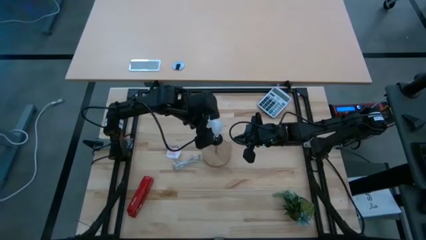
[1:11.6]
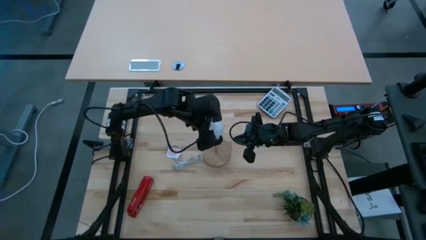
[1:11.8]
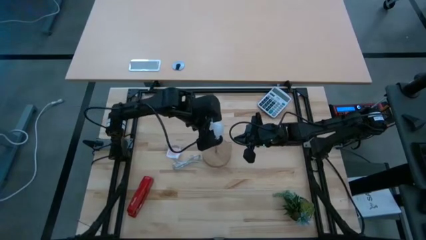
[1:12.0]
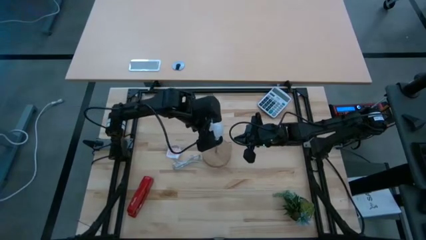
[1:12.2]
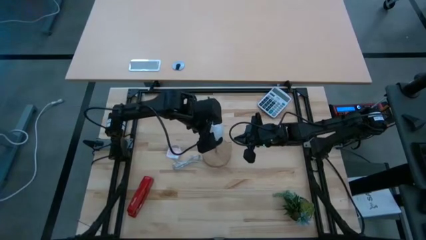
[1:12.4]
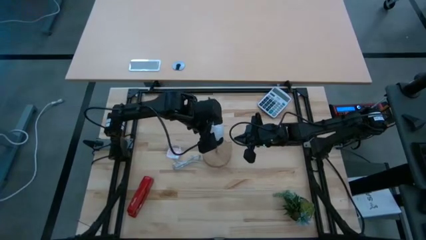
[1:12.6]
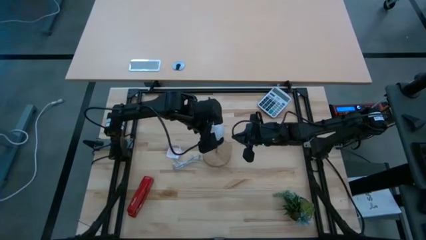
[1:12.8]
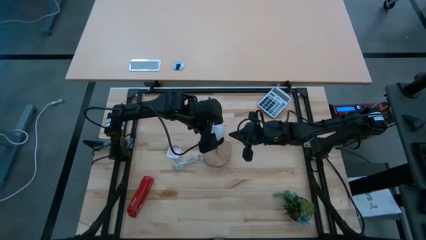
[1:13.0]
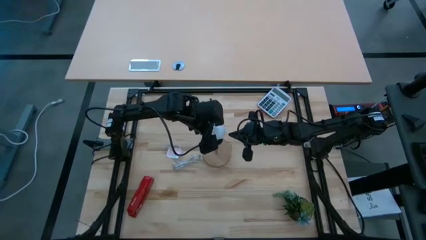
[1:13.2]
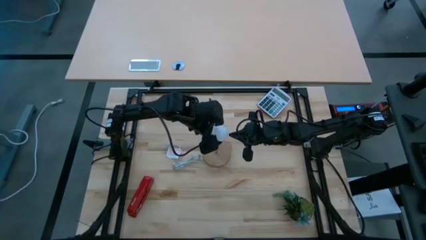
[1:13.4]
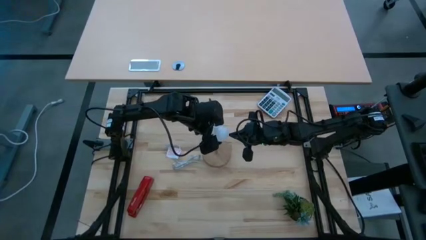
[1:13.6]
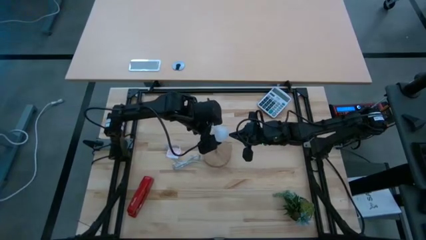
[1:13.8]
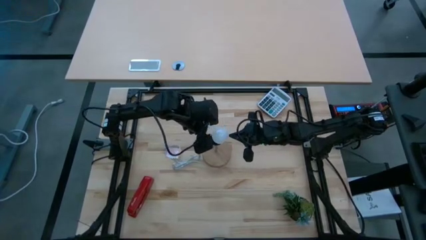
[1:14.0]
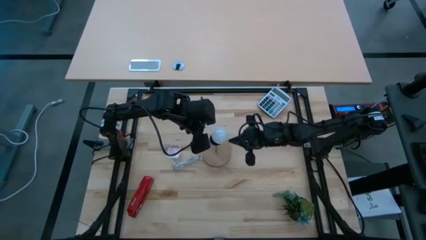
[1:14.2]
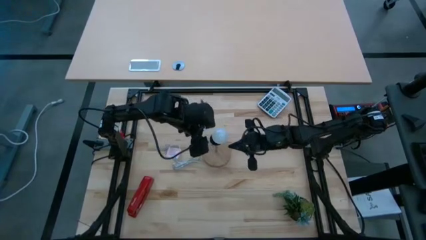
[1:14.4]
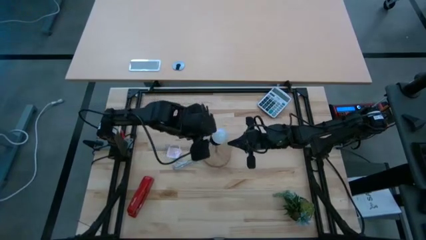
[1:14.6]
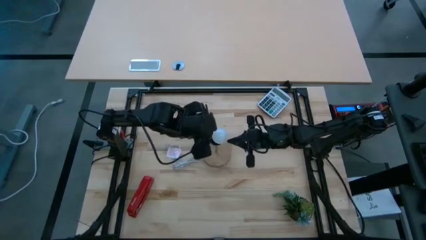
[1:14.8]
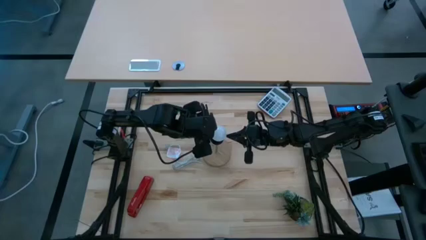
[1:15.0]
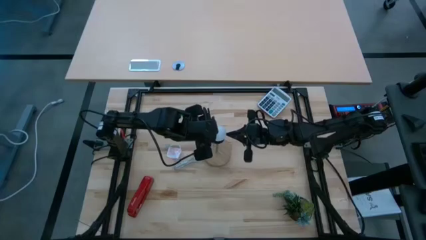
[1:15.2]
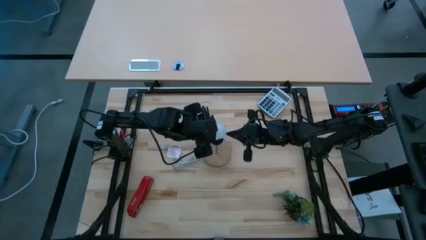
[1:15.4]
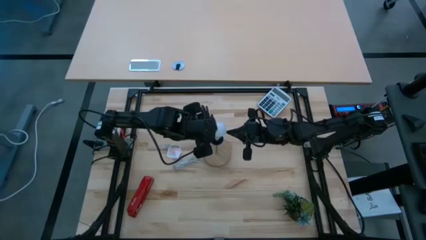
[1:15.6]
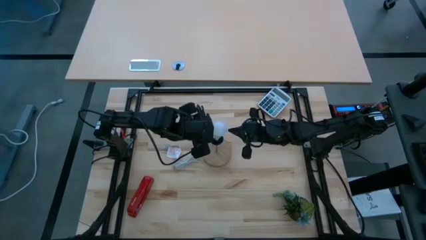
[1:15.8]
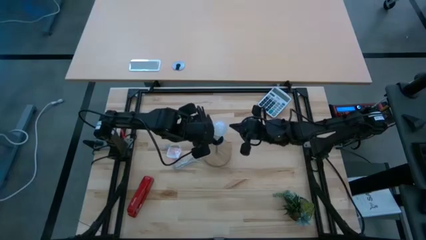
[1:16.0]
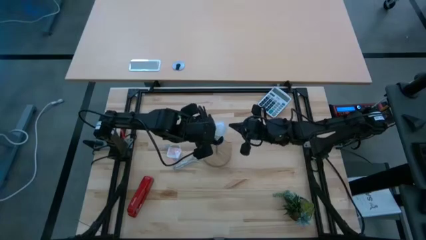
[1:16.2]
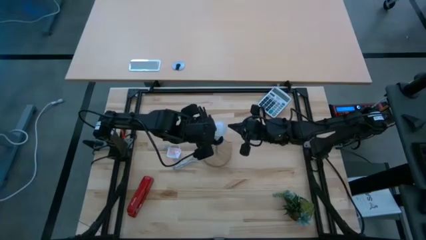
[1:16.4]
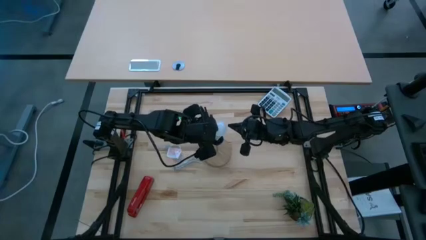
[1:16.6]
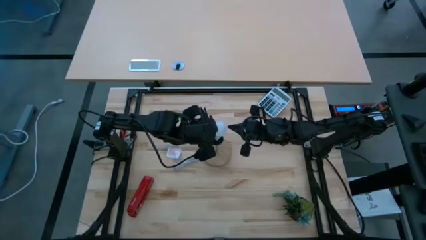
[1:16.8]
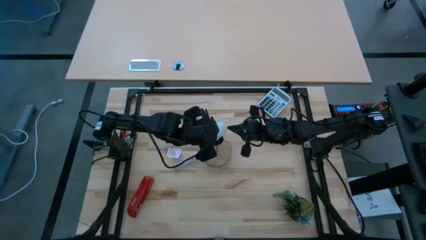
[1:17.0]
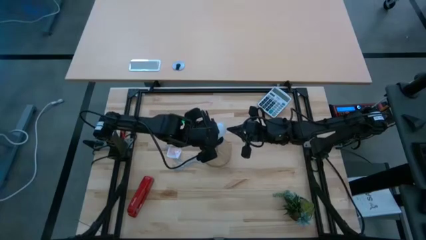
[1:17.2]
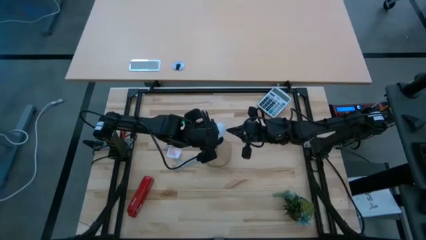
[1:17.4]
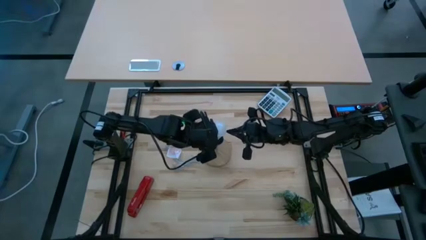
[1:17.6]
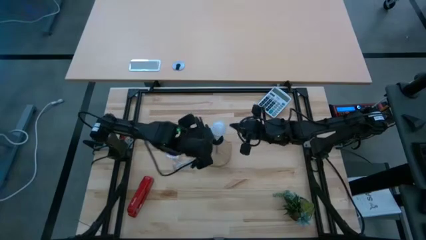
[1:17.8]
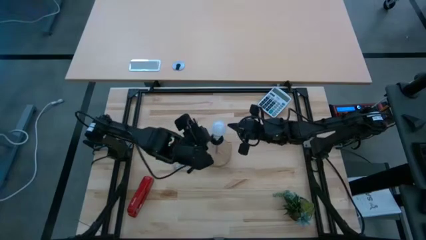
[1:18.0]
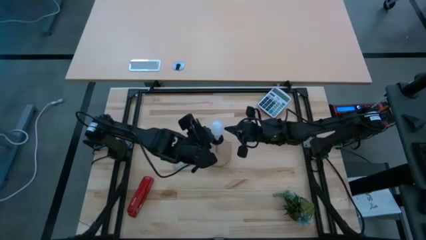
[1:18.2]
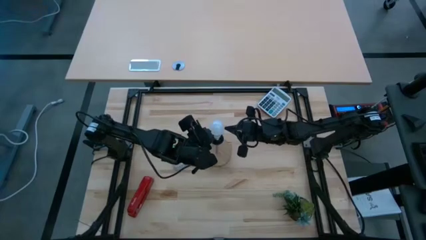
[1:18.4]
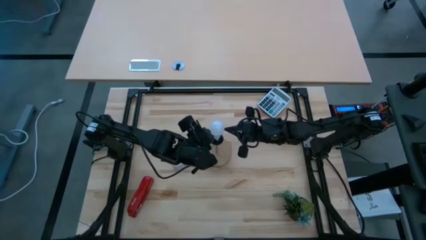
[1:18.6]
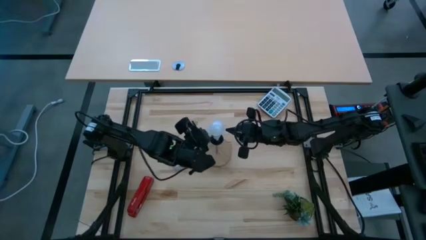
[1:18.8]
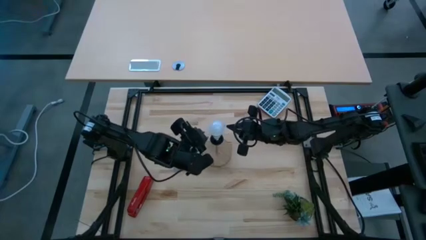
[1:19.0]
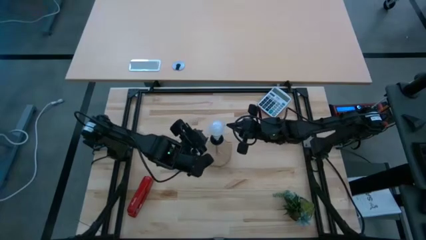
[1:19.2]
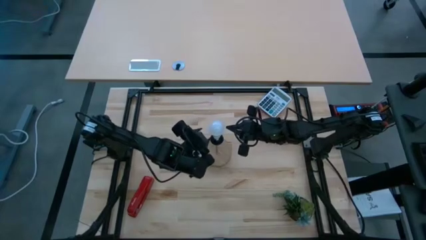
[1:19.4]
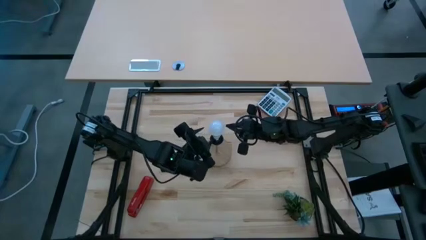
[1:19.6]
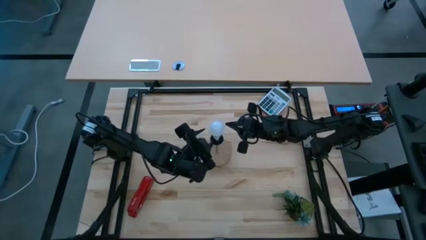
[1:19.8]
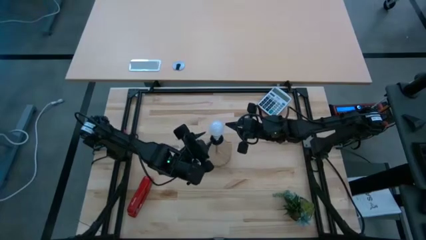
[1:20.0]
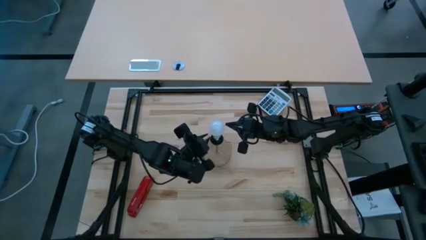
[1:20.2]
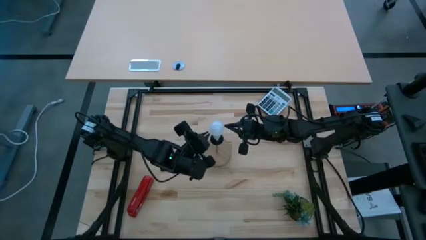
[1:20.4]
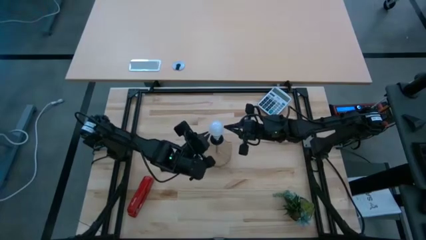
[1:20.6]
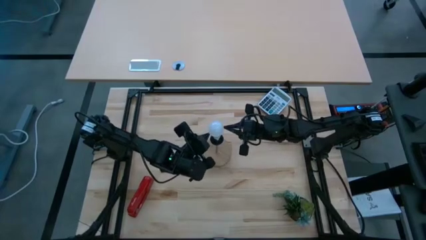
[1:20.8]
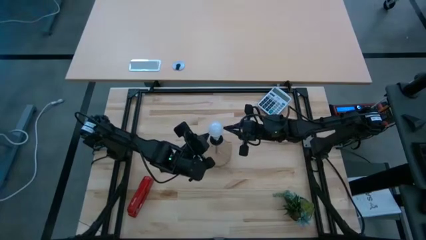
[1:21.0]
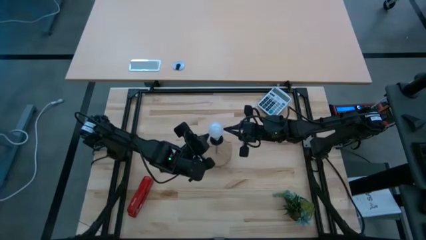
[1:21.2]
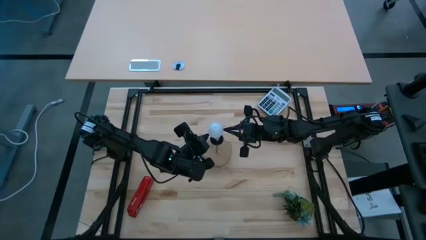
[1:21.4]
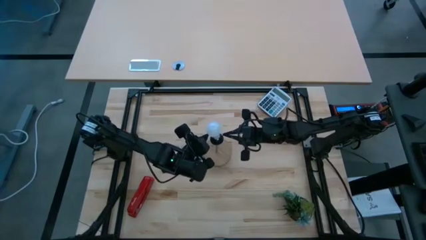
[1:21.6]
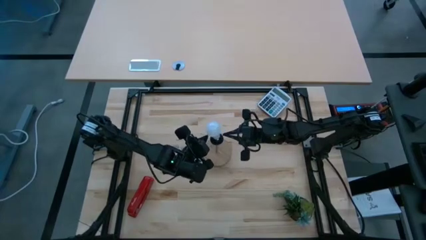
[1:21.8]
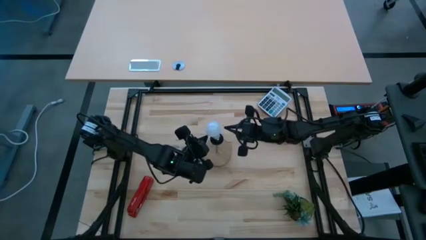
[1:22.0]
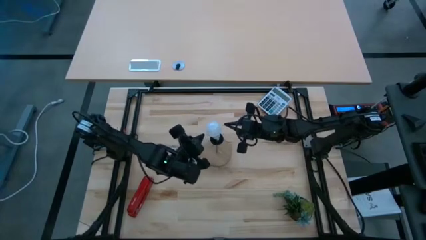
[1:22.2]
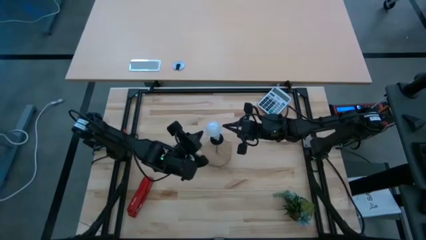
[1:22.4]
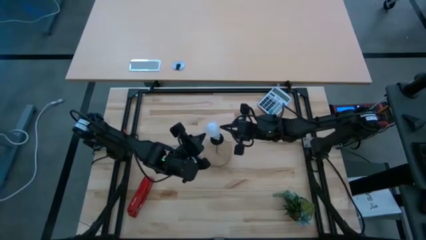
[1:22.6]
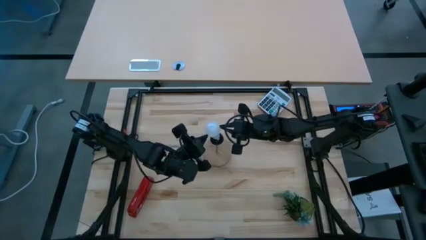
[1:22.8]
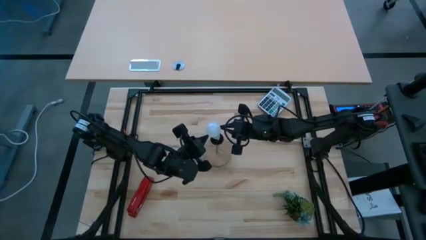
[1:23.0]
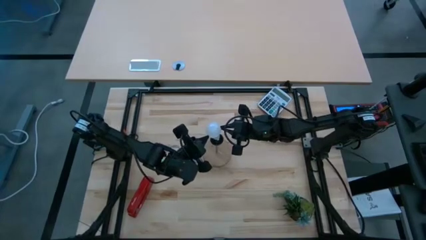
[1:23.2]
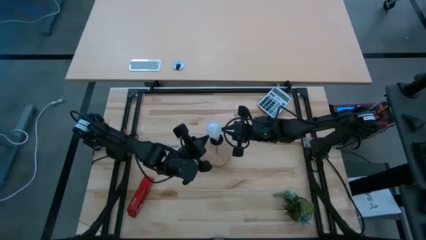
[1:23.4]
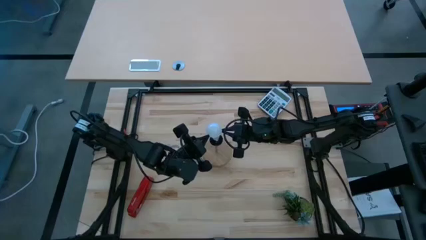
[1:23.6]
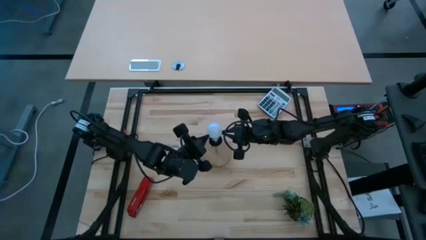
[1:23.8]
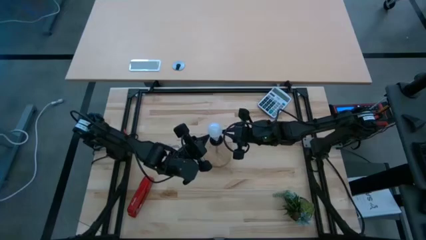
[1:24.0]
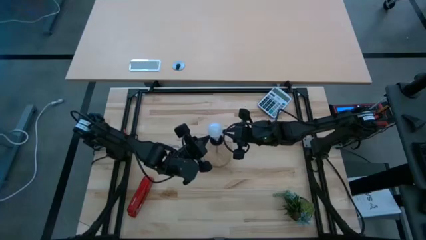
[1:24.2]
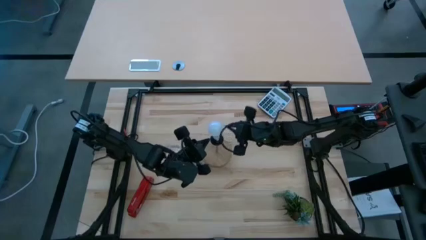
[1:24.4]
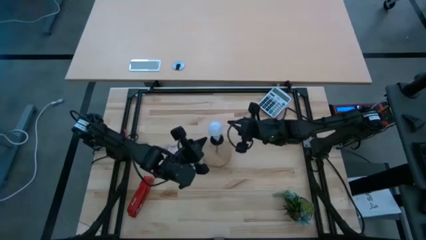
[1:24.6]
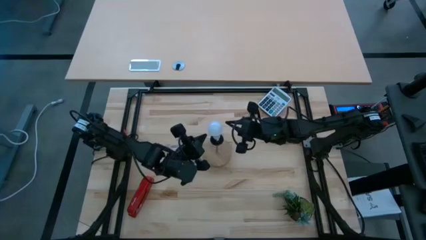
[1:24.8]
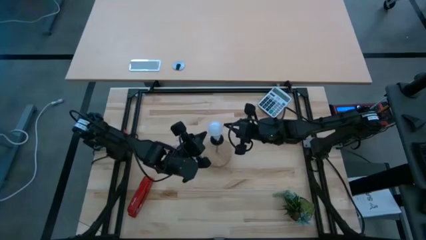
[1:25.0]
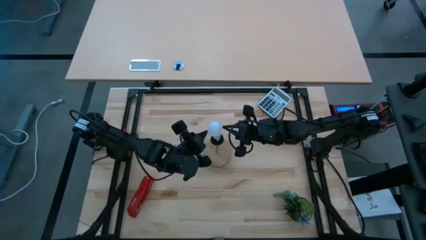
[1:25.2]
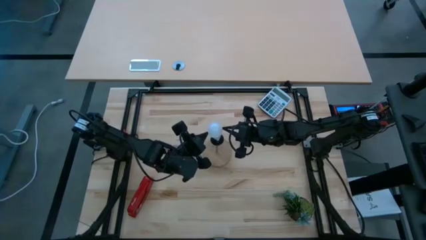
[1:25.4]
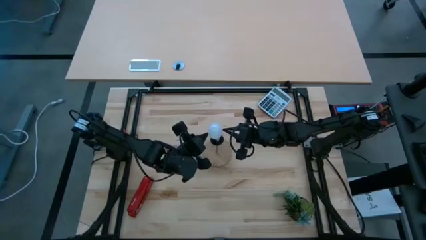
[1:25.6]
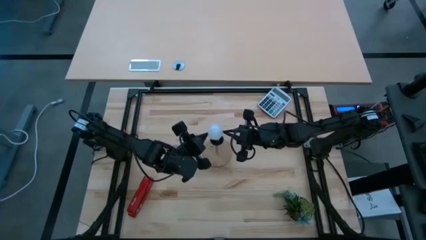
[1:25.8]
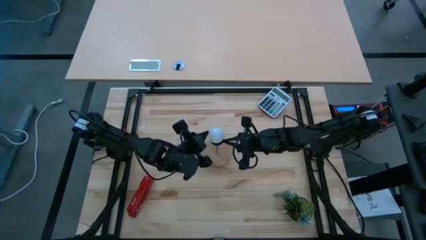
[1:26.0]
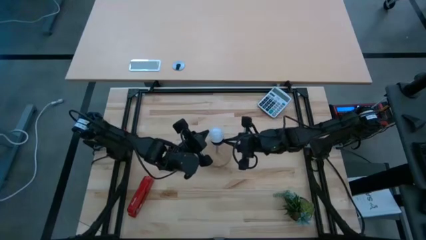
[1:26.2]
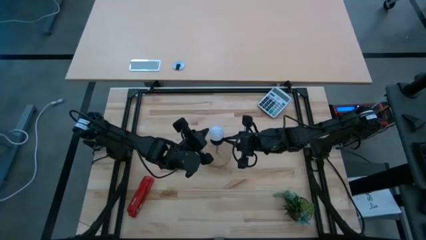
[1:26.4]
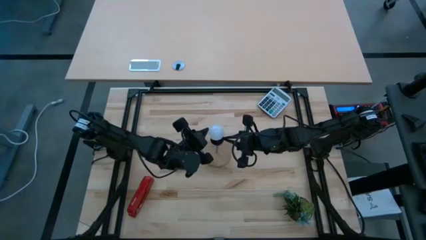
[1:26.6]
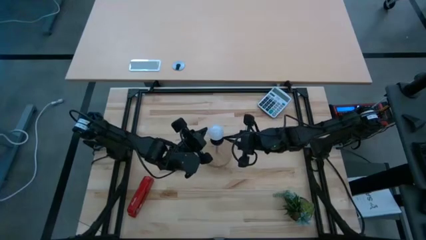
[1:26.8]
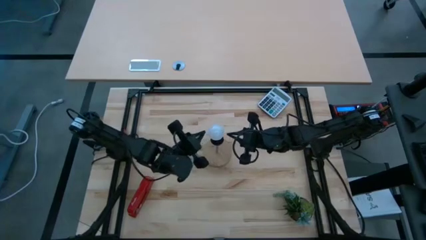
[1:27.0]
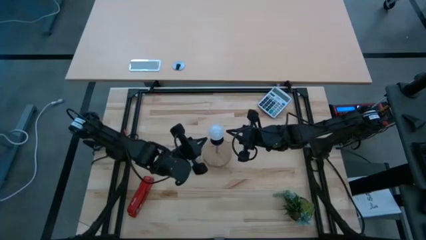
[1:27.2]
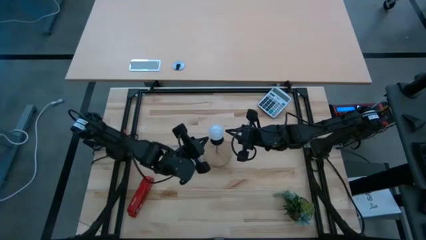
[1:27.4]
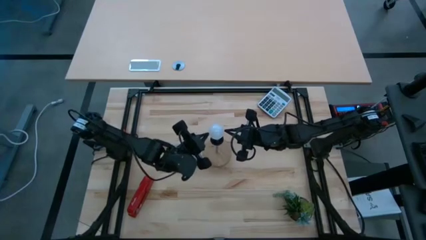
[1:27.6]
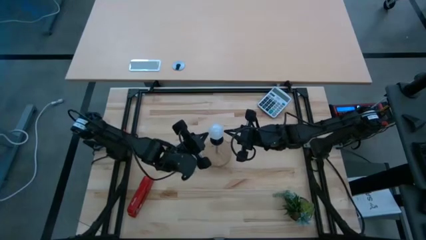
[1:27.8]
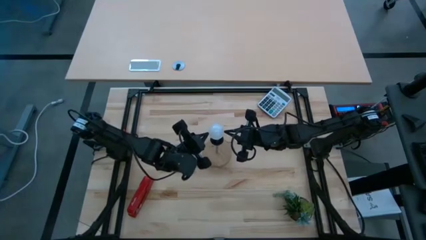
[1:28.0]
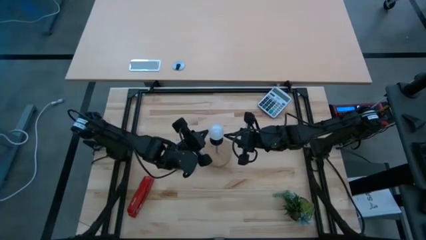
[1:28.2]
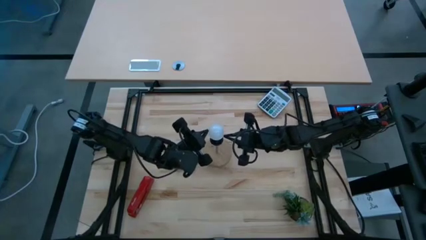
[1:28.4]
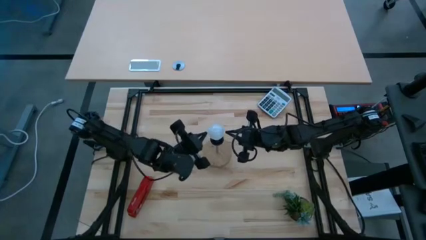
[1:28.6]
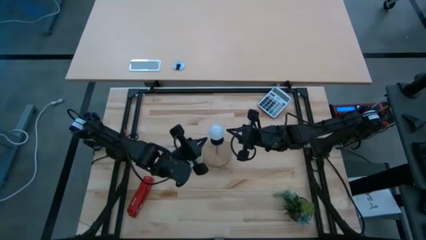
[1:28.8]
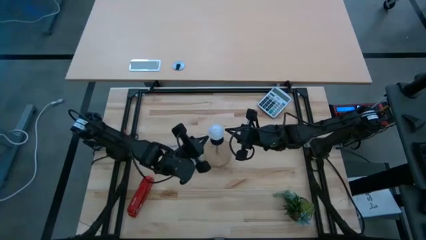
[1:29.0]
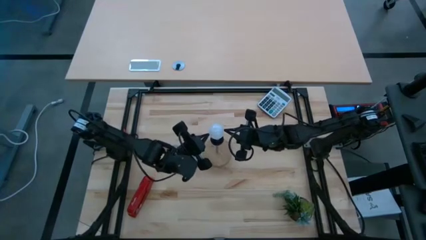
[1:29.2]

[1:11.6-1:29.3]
Task: Screw lightbulb
Insert the lightbulb into the brown lamp
